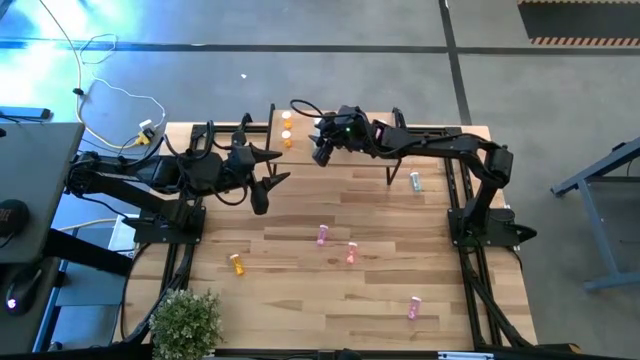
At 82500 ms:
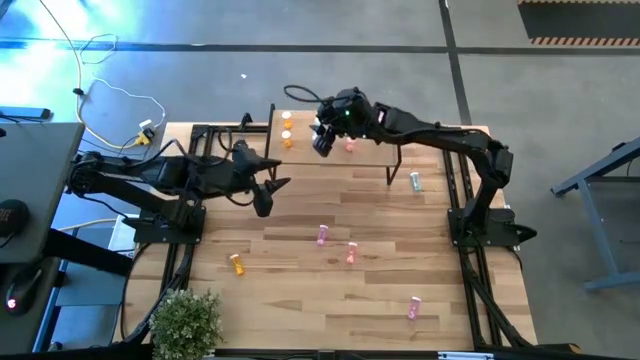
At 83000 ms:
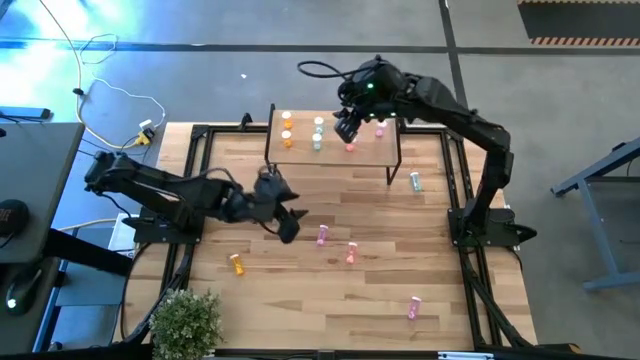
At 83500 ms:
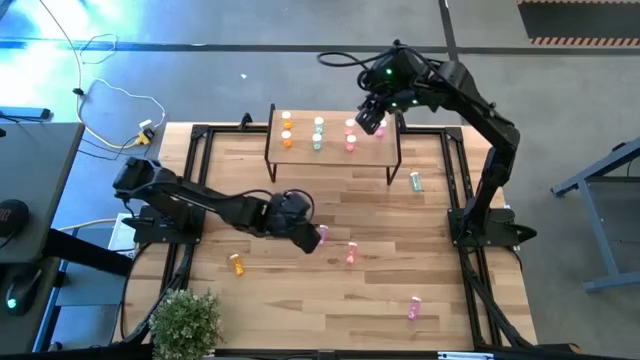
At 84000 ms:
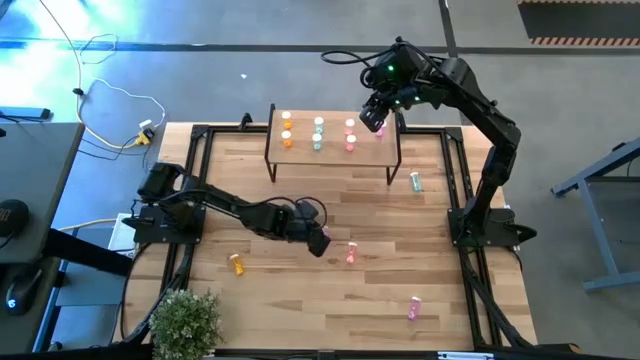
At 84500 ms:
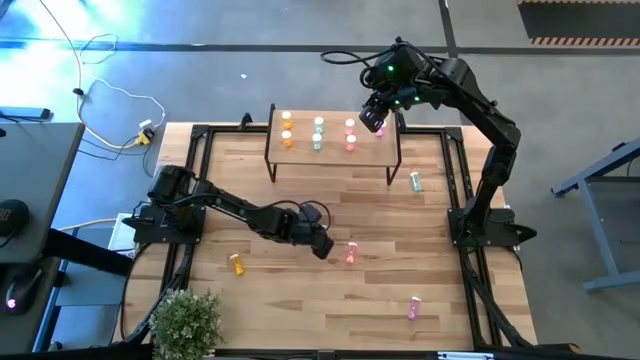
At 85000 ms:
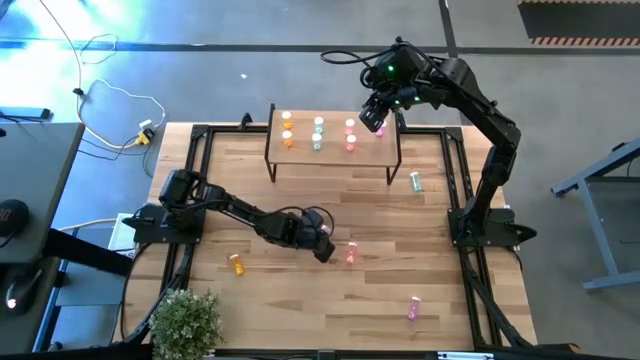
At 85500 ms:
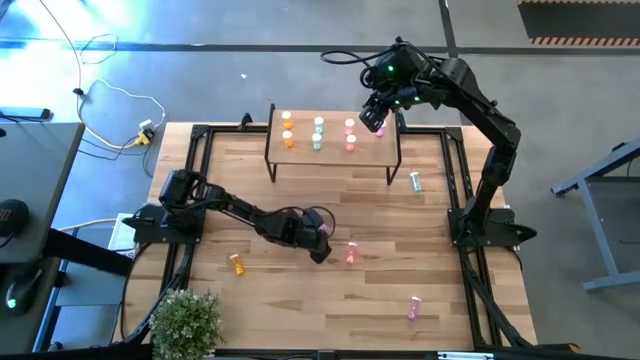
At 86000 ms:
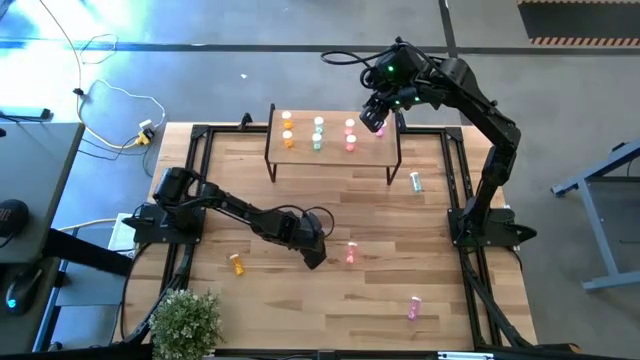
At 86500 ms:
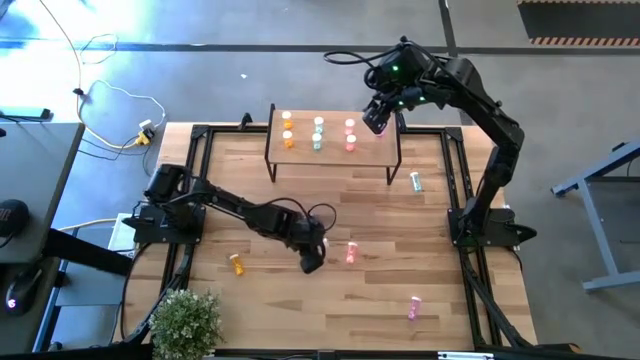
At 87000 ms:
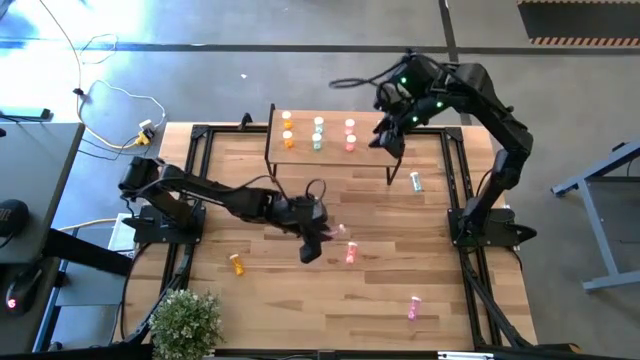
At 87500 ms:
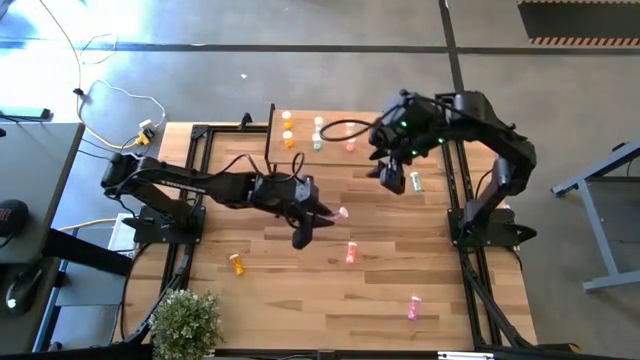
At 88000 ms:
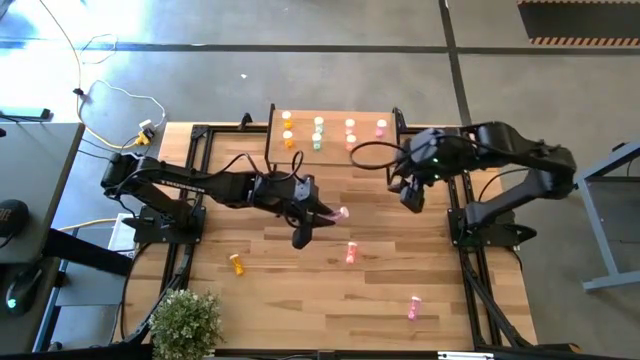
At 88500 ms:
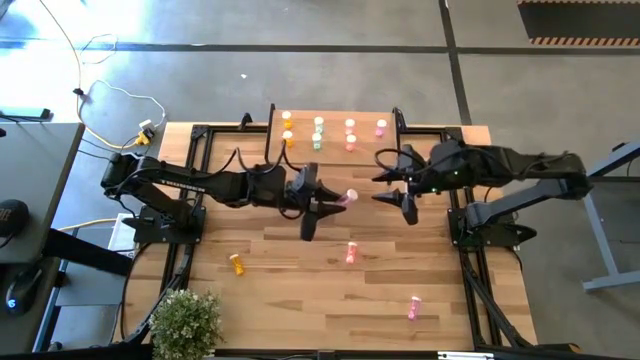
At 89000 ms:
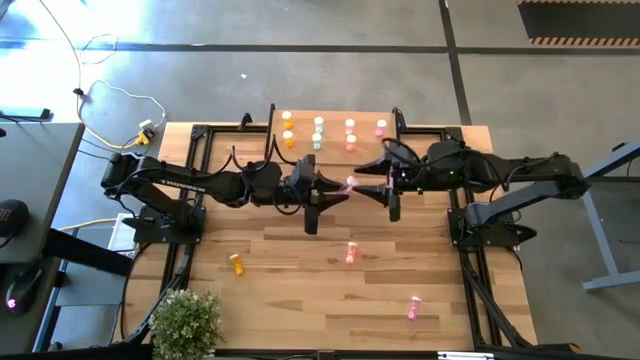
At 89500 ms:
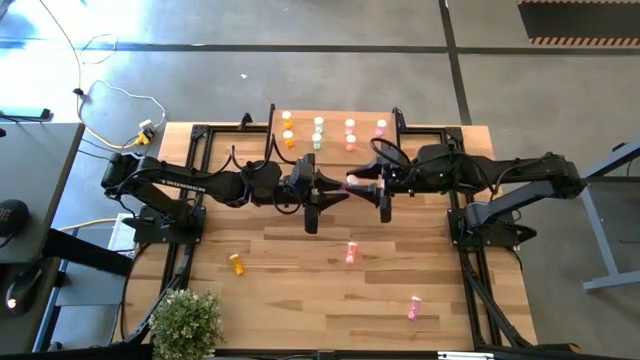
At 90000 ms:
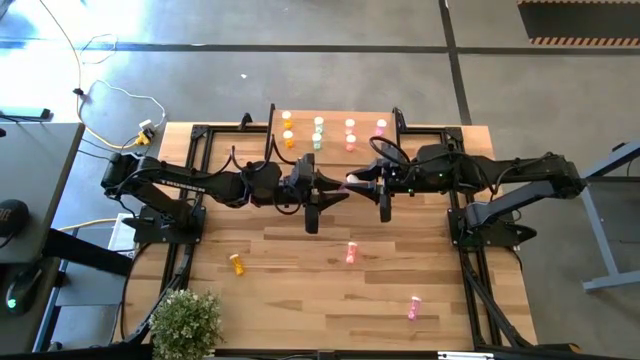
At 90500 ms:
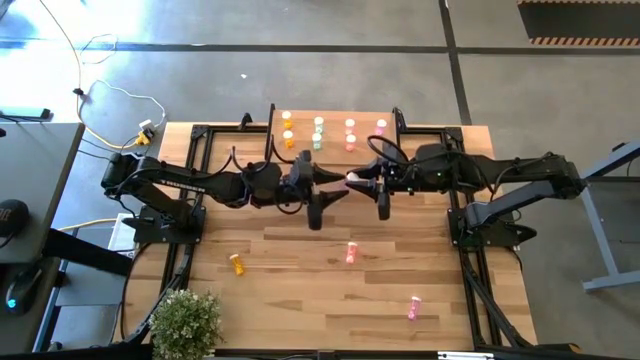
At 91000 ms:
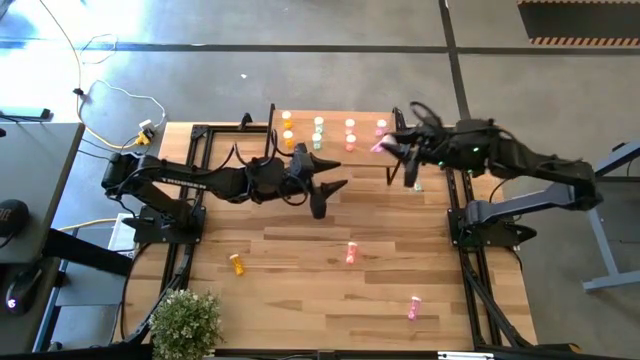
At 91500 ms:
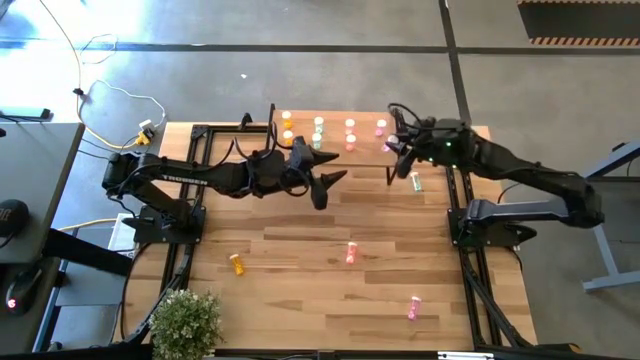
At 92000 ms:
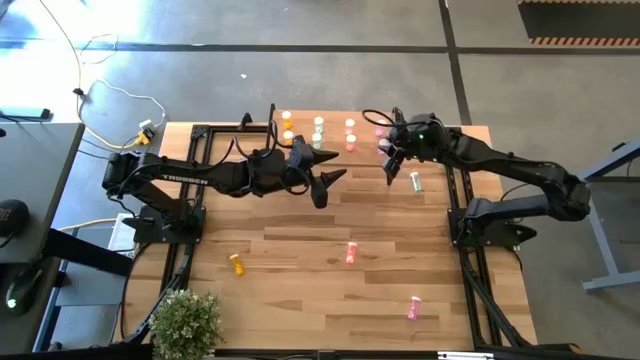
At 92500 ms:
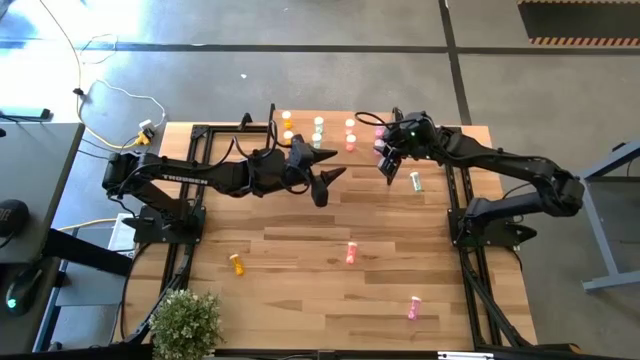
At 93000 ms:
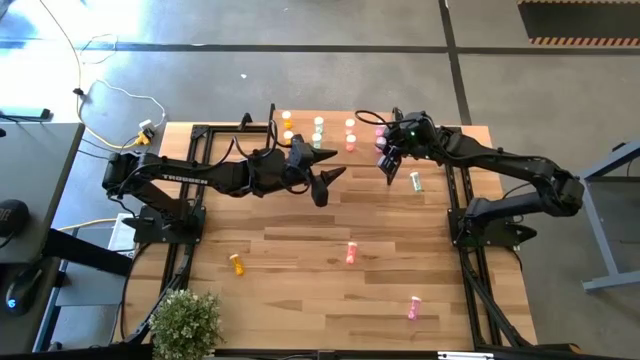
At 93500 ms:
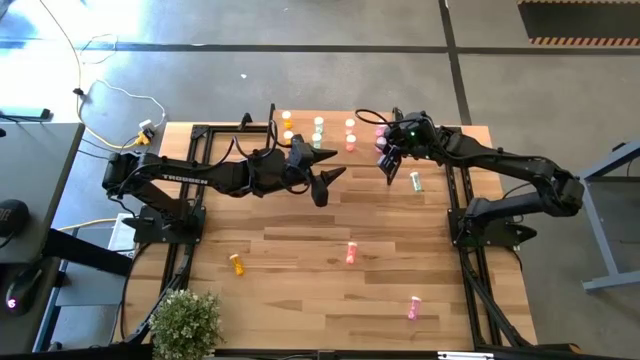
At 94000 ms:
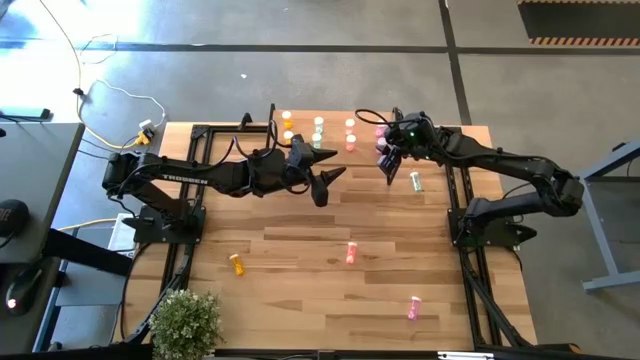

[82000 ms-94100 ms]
Task: Pick and place medicine bottles onto shelf by color
Put the top purple pill bottle on the shelf aligned with the purple pill bottle

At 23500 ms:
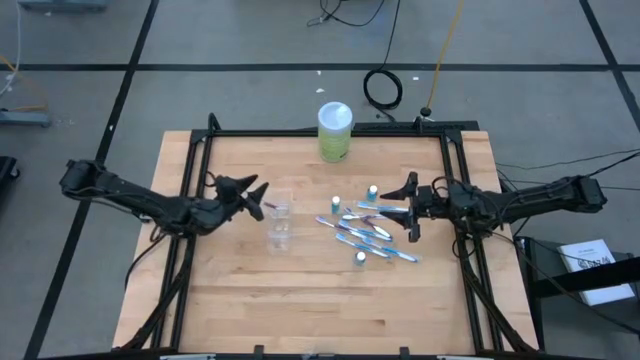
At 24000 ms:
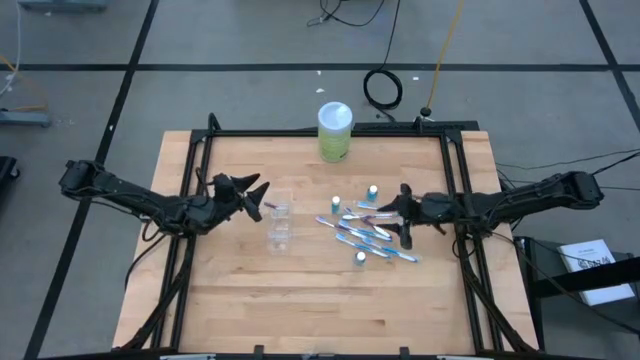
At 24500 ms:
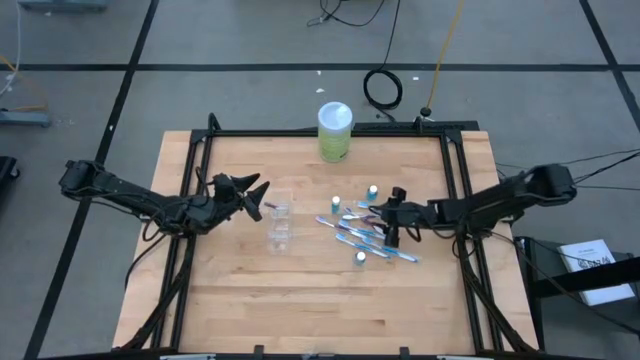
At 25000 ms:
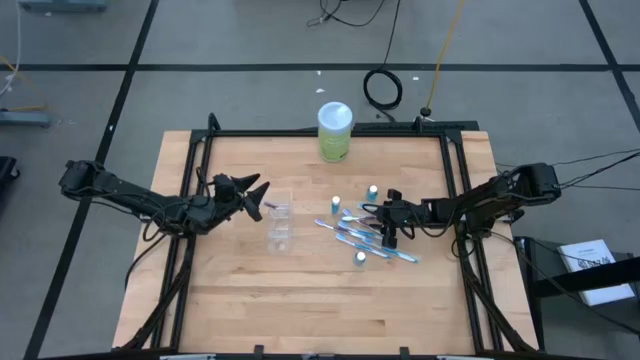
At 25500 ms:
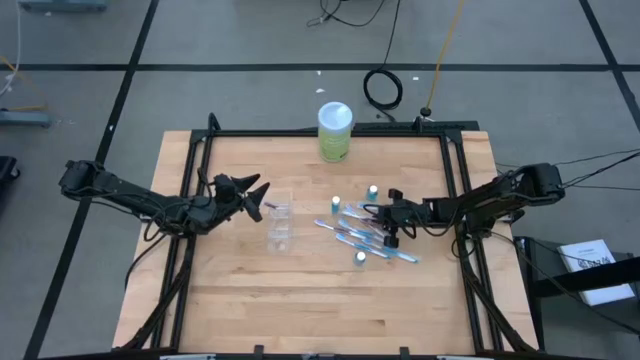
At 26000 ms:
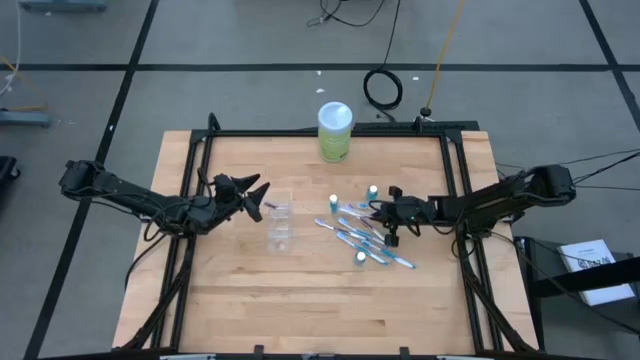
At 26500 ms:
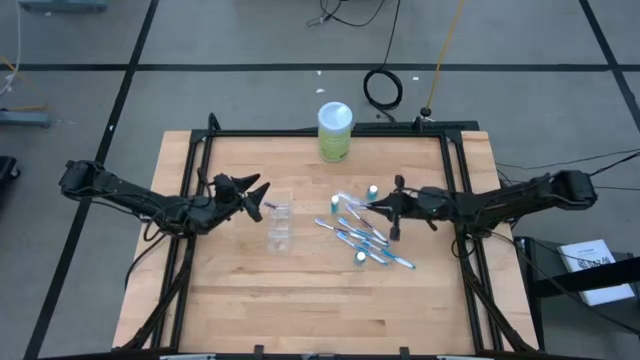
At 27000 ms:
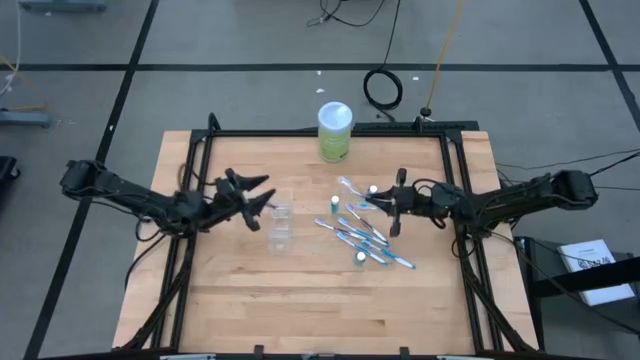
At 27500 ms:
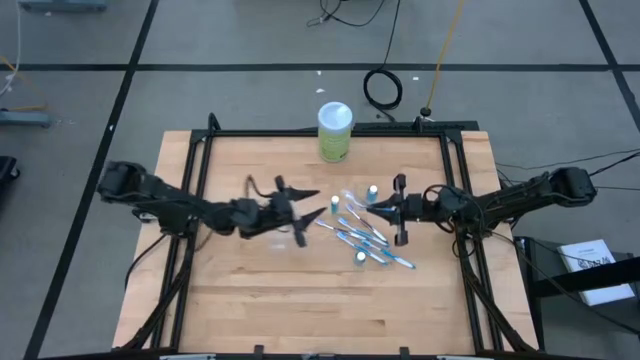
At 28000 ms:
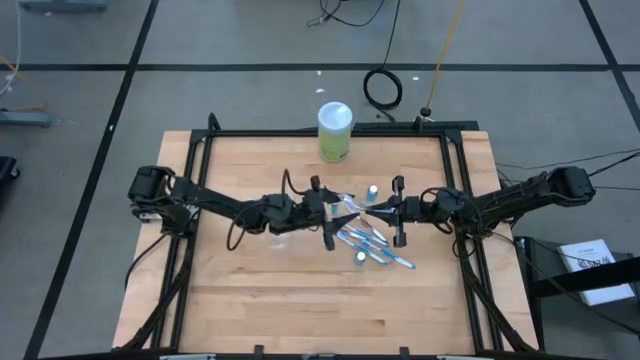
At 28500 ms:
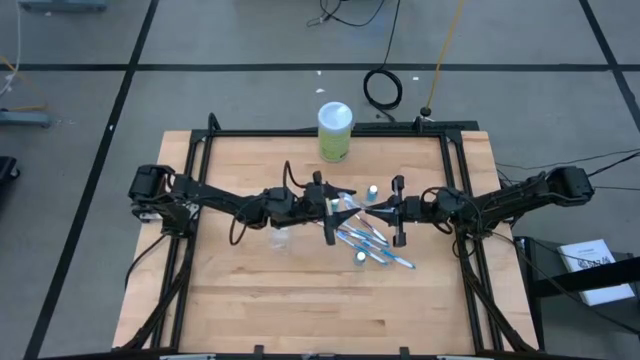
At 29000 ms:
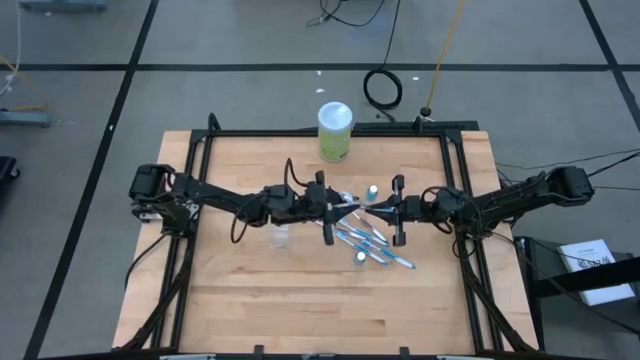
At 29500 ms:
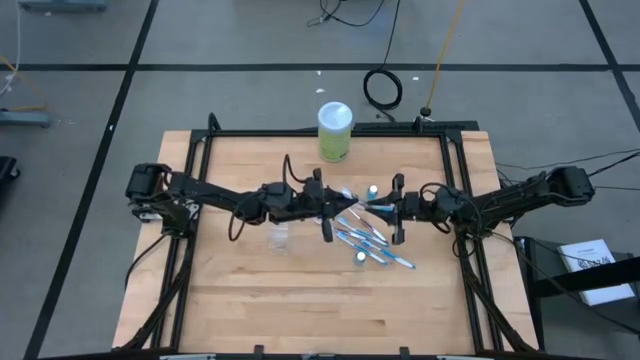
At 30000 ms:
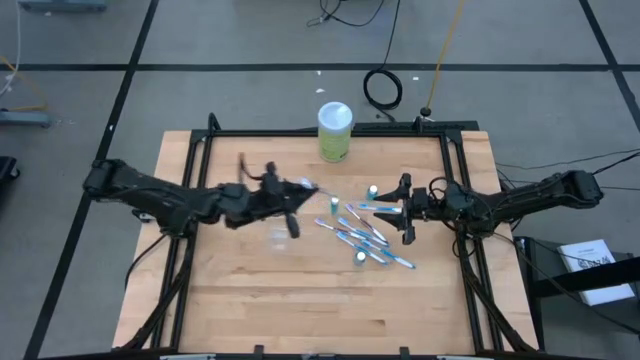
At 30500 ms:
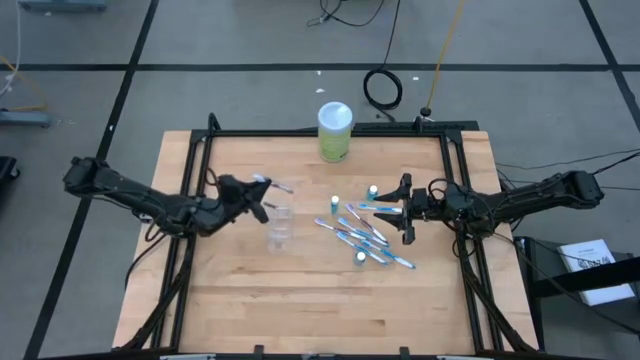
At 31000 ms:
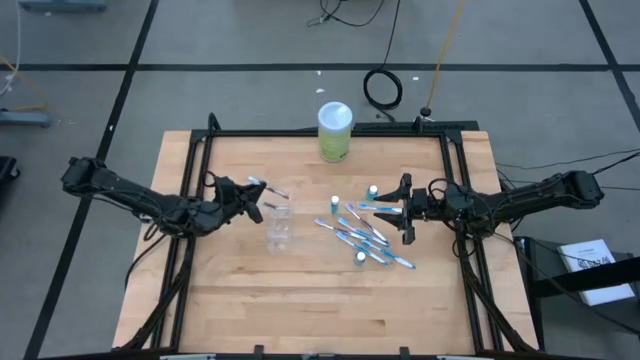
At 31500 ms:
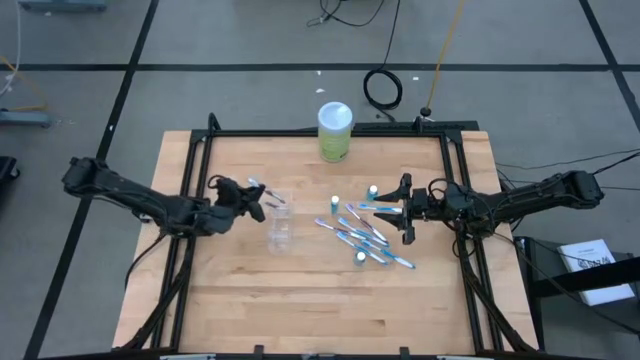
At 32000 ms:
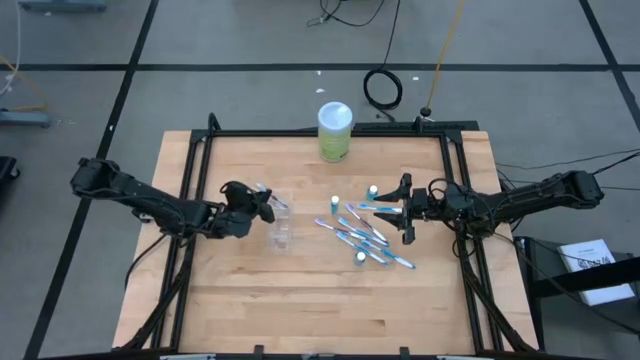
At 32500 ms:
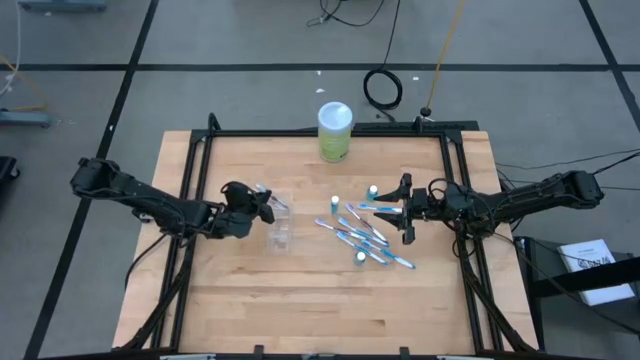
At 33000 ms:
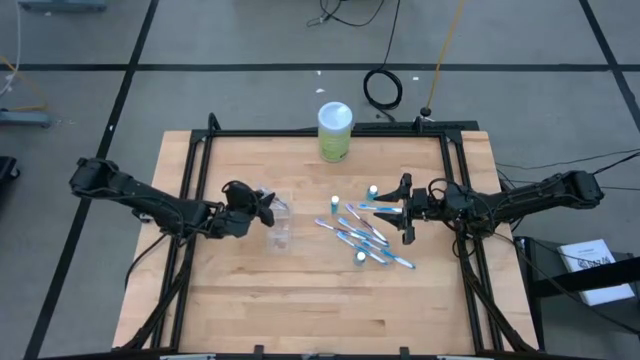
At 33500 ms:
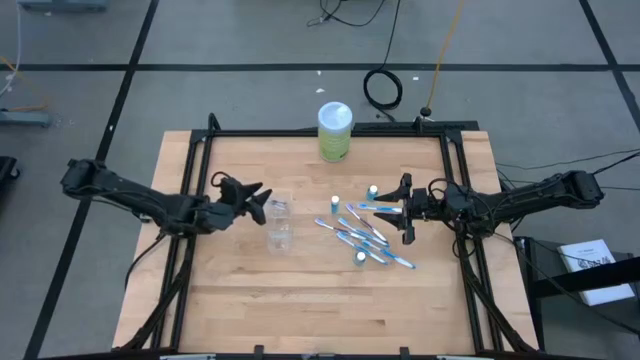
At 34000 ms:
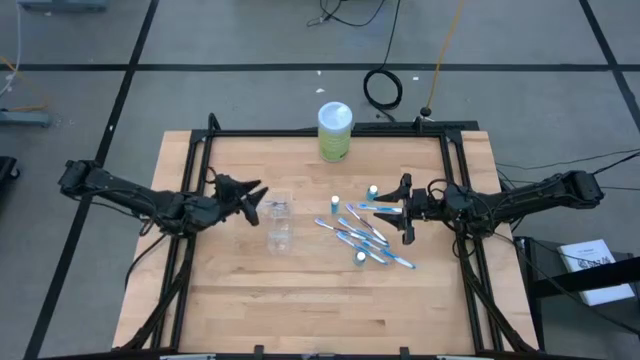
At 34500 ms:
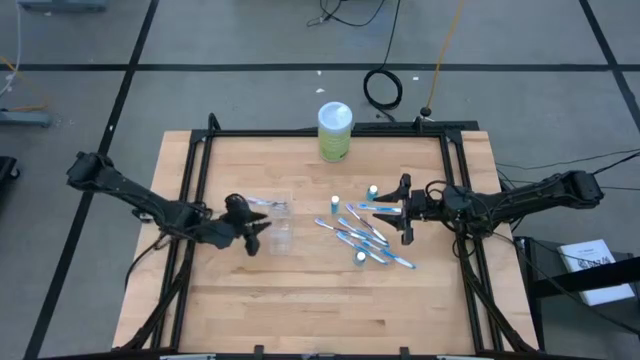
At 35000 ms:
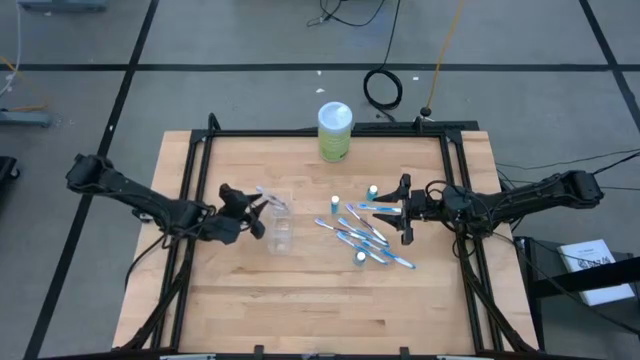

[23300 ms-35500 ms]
Task: Pick & Place toothbrushing station
Put the purple toothbrush into the transparent organizer
